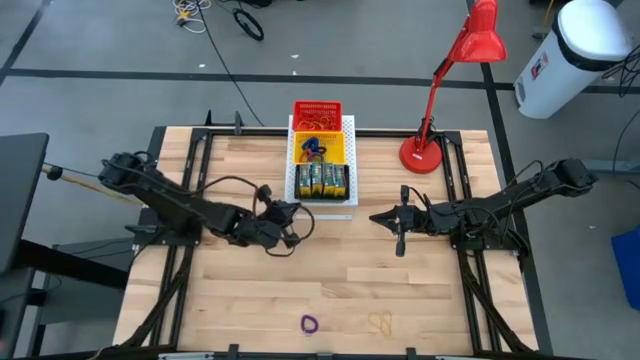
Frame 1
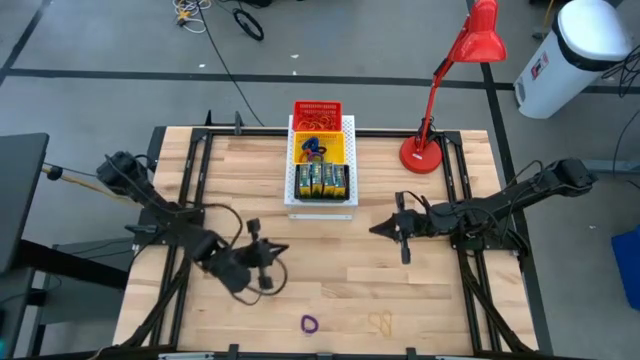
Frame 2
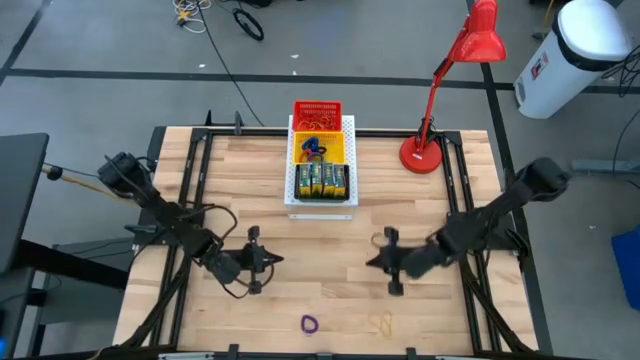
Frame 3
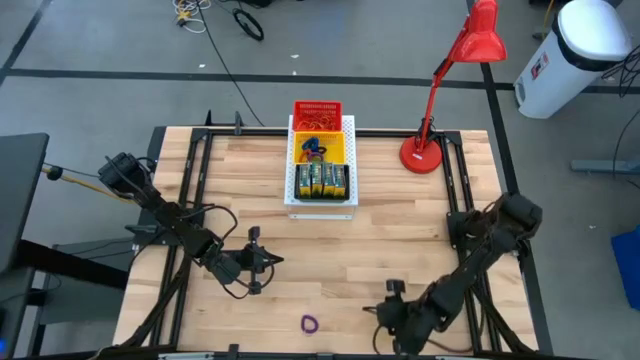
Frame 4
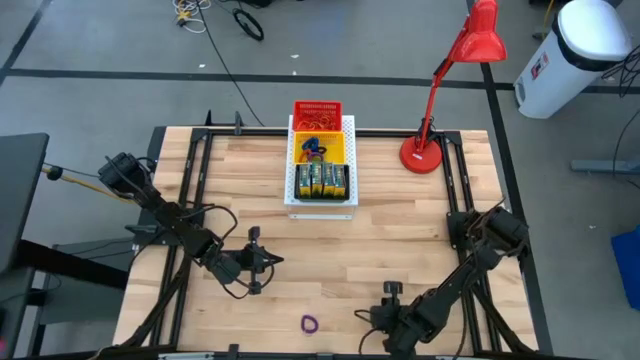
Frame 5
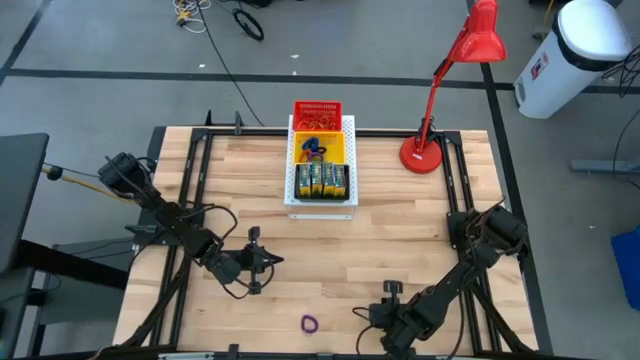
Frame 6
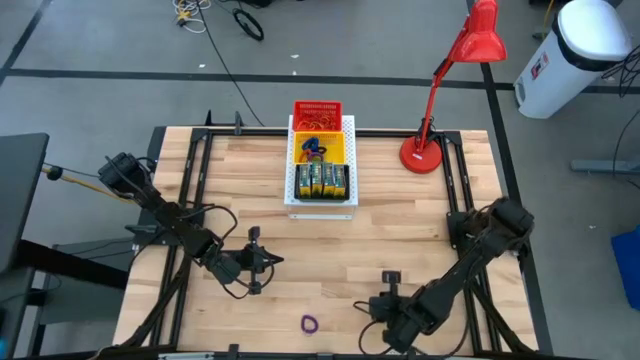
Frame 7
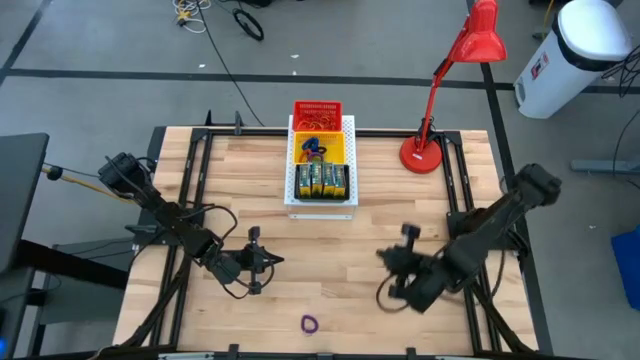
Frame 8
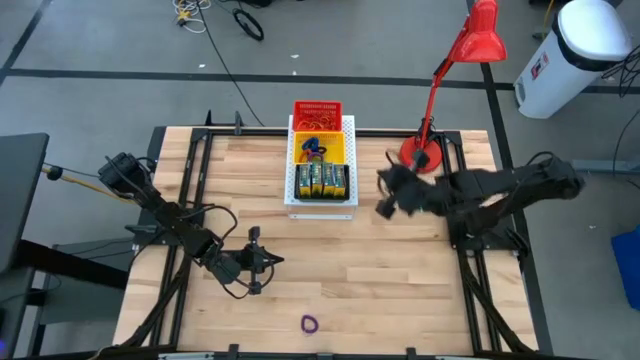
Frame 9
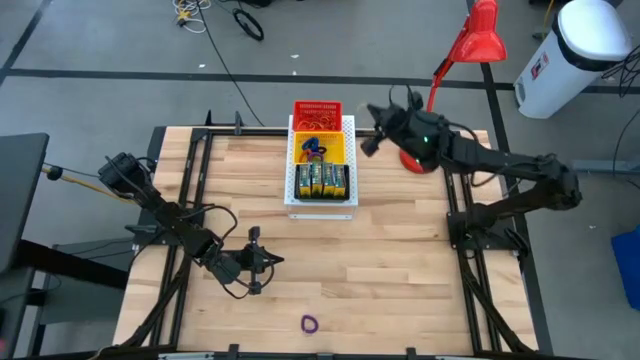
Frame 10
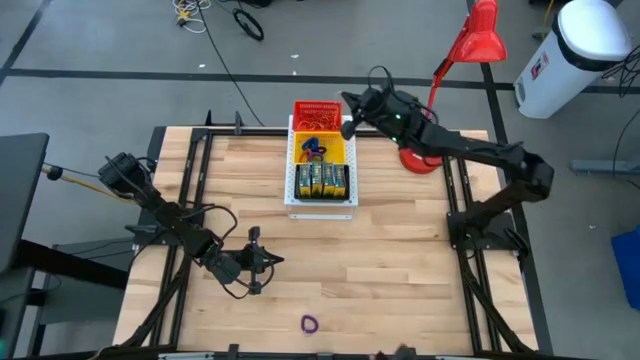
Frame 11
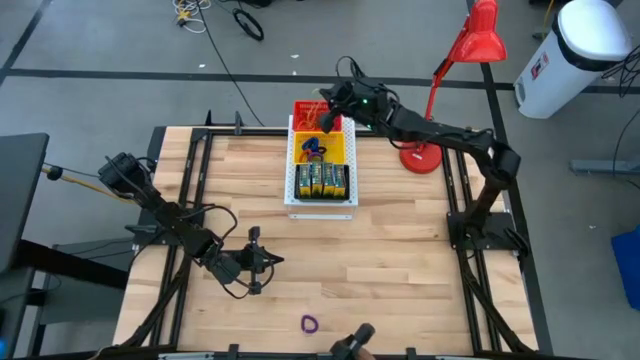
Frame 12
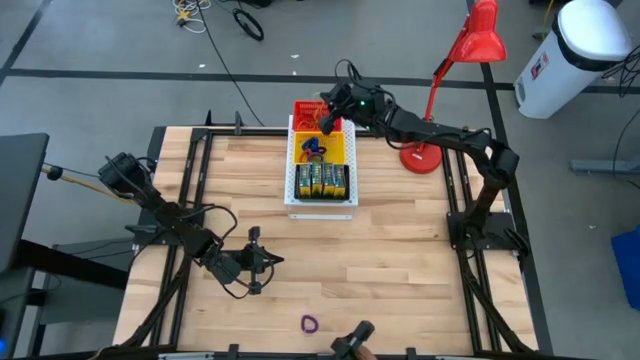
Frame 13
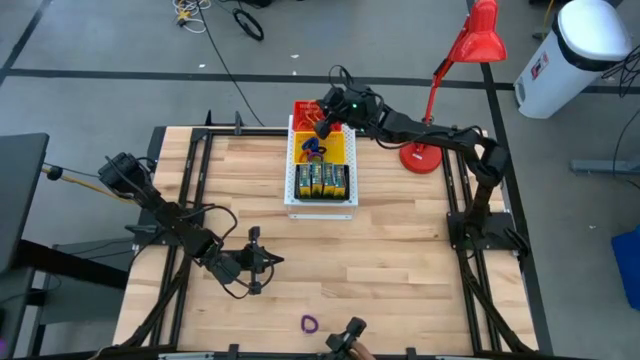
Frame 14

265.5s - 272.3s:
Task: Pick & Place Office Desk Supplies
Put the yellow rubber band into the red bin on the shelf

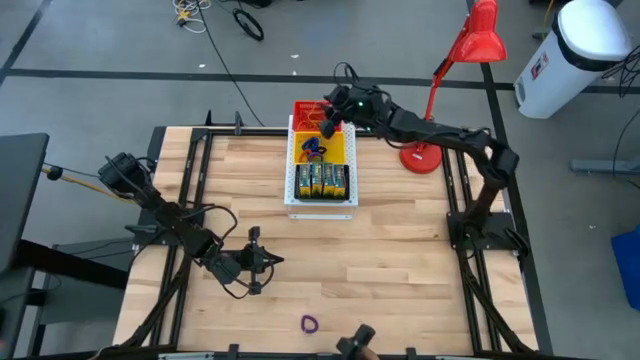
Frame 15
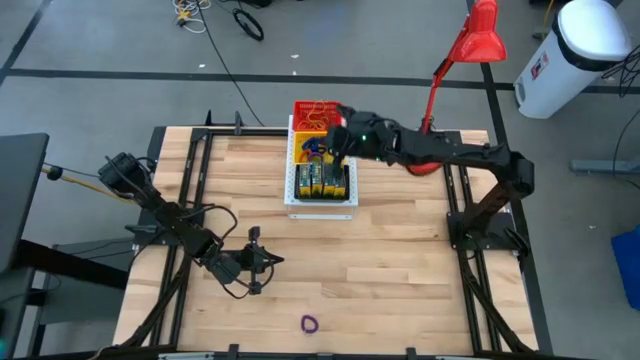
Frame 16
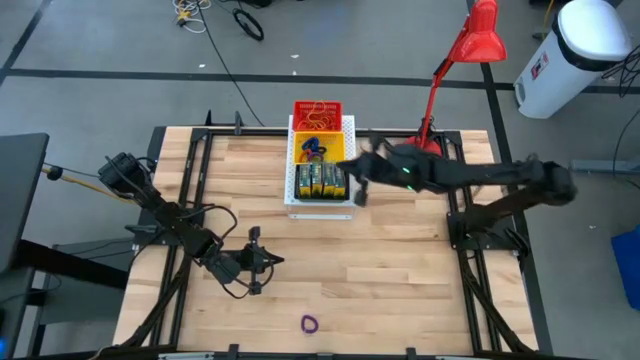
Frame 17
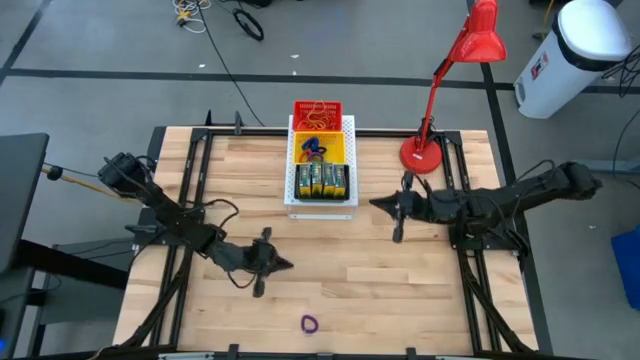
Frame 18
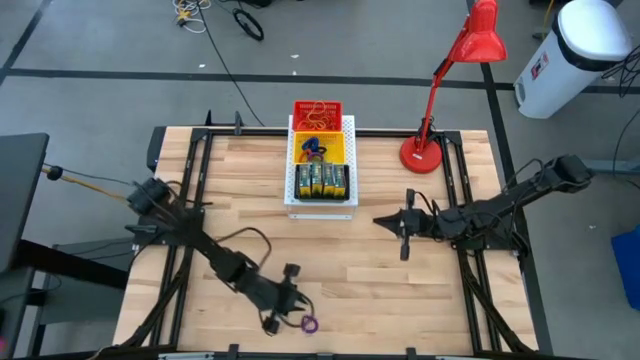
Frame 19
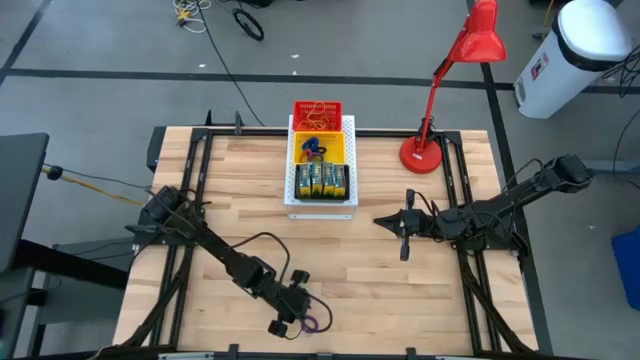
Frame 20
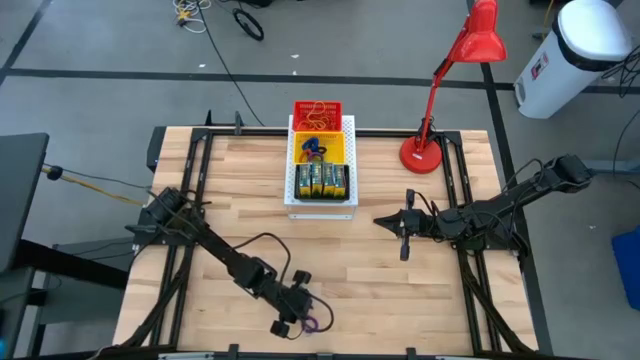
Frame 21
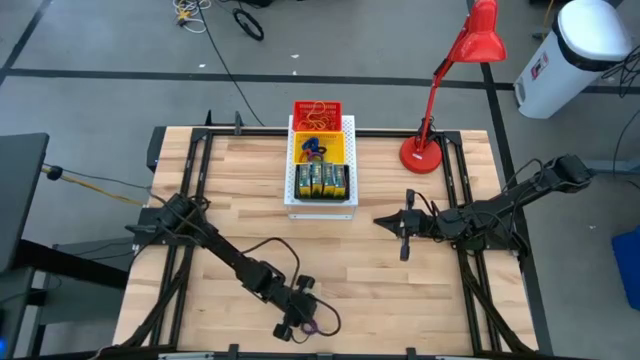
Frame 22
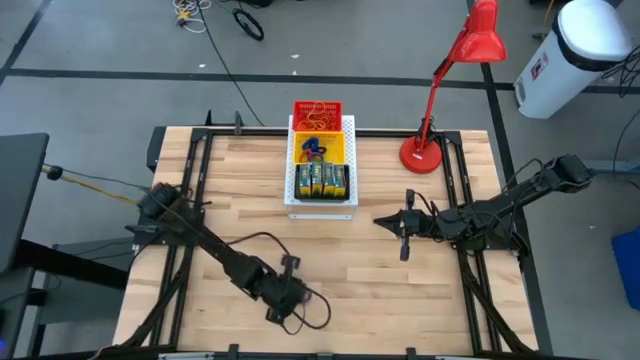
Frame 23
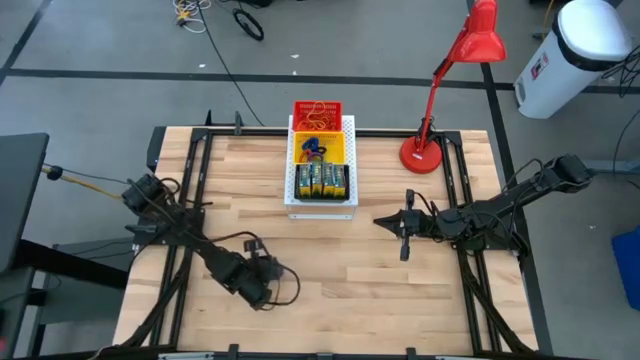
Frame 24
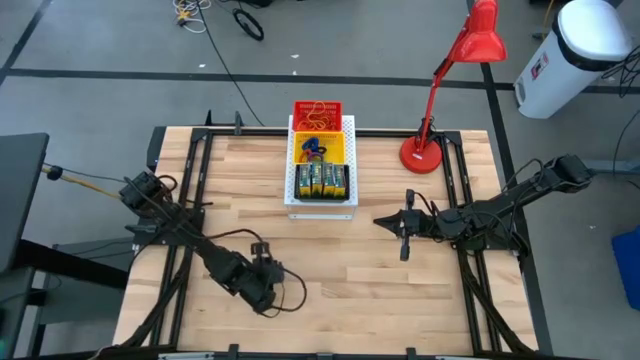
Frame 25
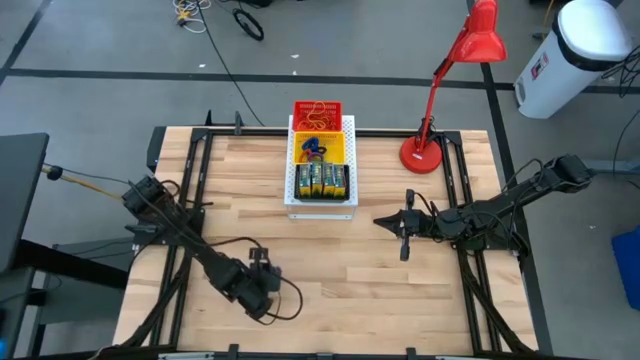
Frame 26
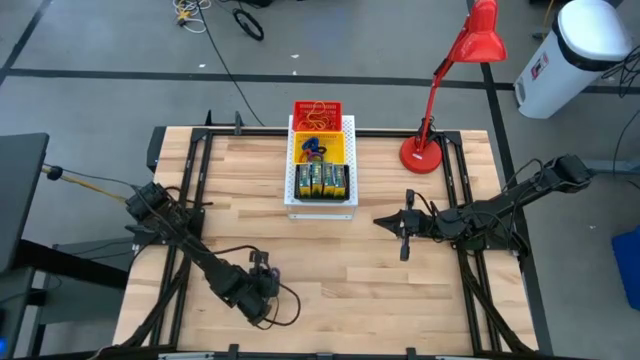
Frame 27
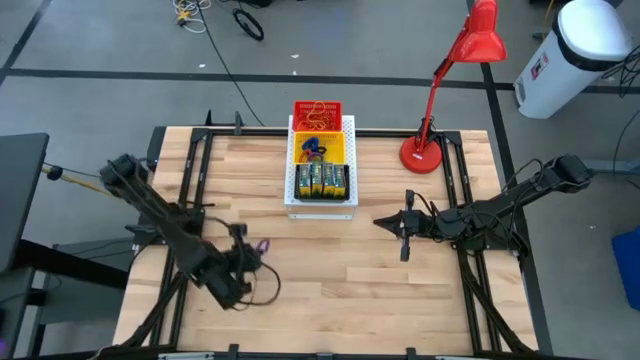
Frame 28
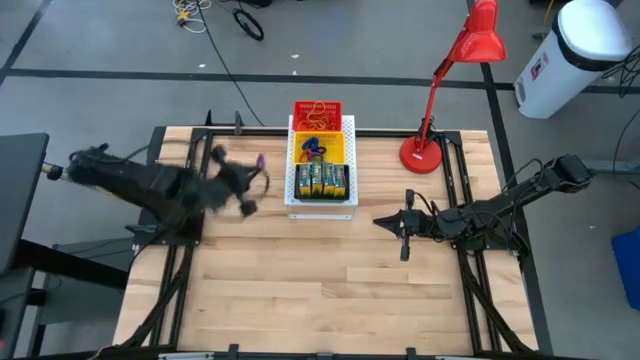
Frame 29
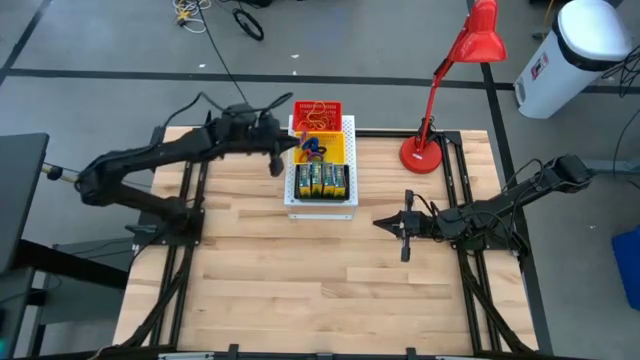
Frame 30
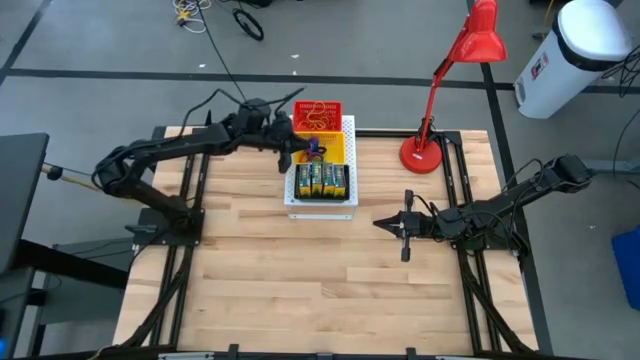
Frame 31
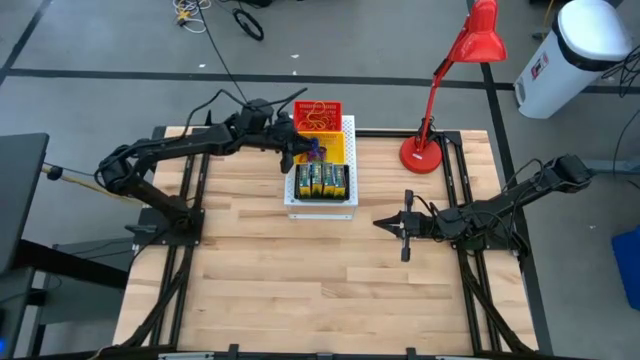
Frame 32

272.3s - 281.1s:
Put the voilet spring keychain into the yellow bin on the shelf

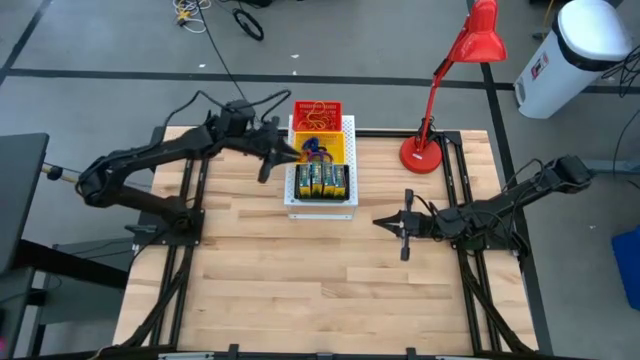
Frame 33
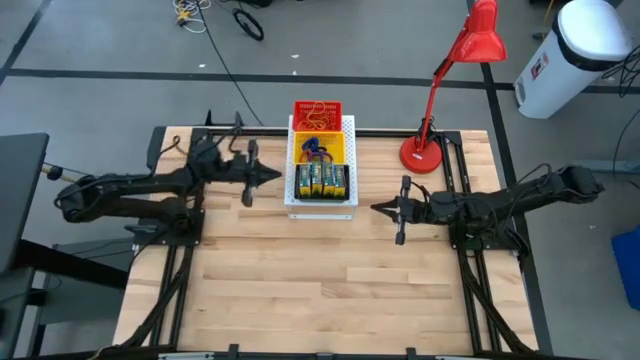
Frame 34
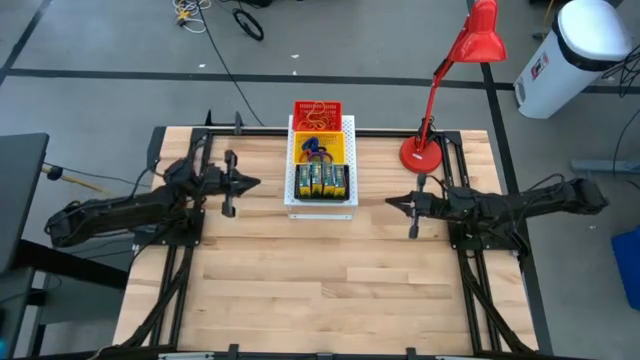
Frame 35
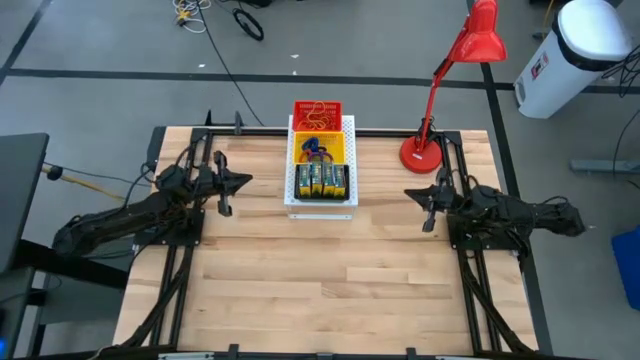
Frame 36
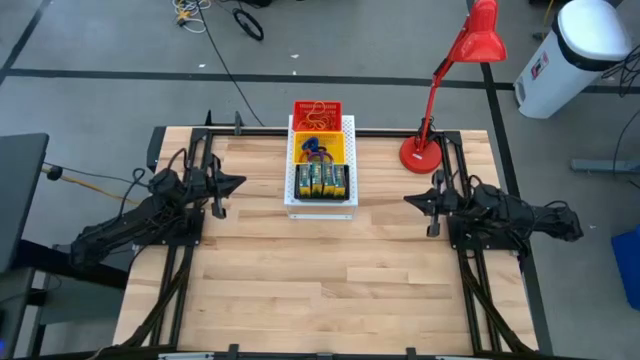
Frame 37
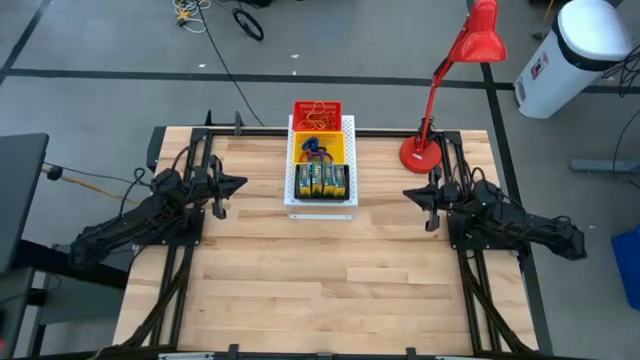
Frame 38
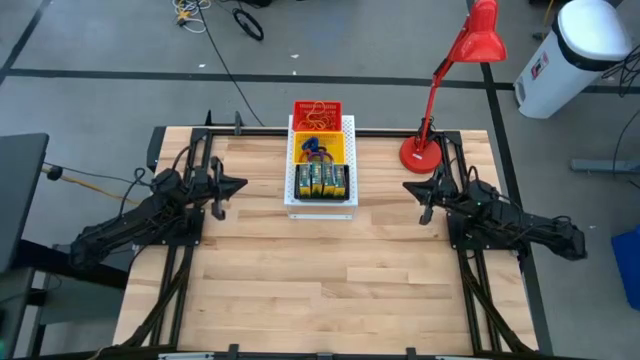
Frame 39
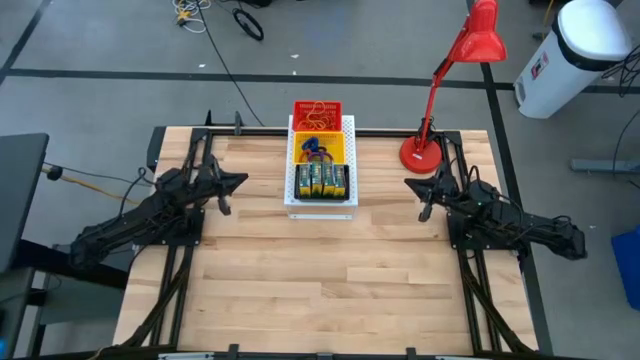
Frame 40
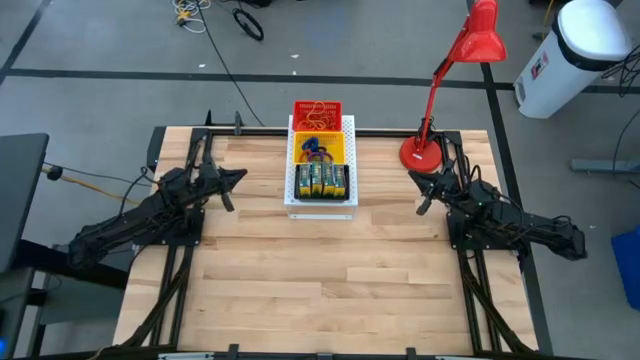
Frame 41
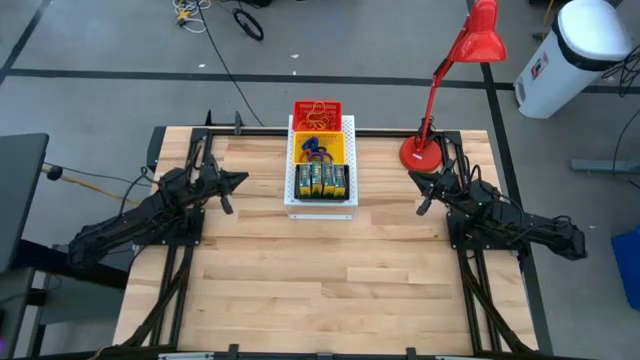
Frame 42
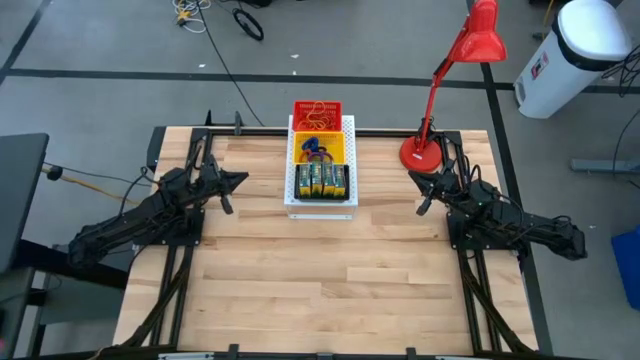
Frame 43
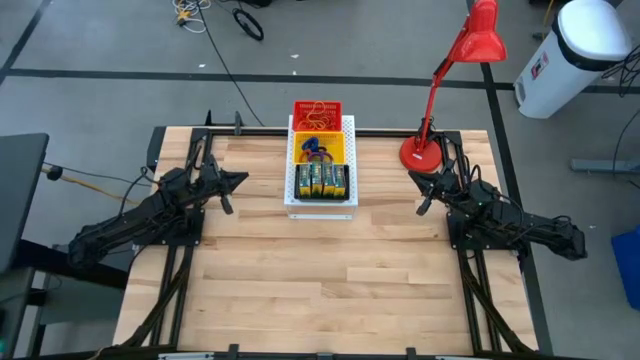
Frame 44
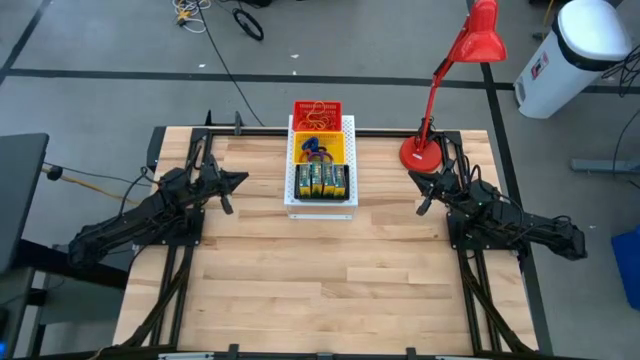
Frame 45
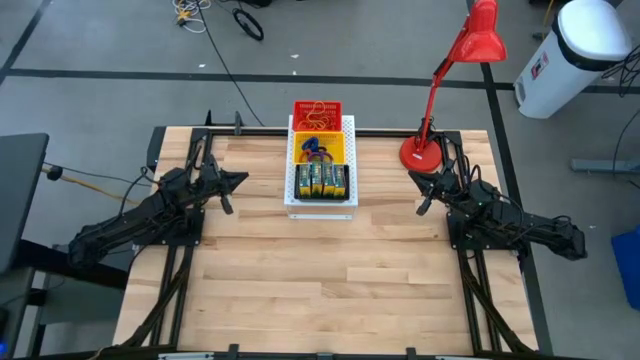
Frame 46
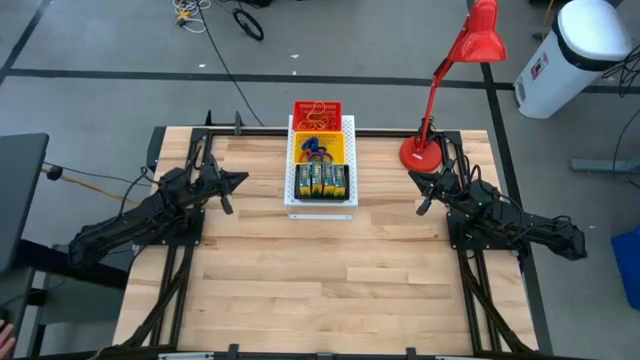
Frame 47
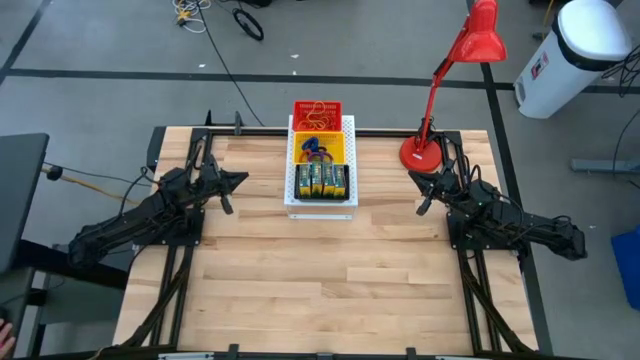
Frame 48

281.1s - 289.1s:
Return to Home Position
